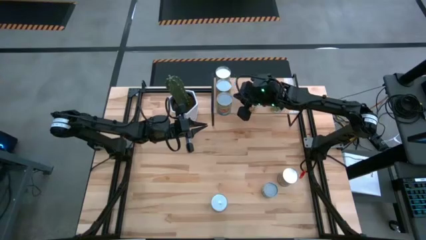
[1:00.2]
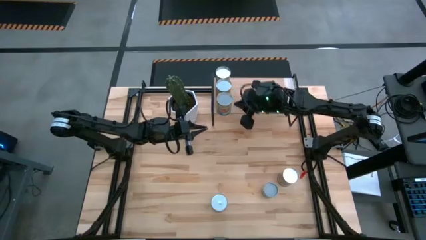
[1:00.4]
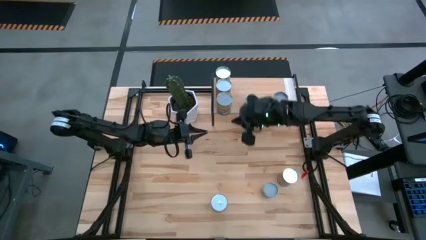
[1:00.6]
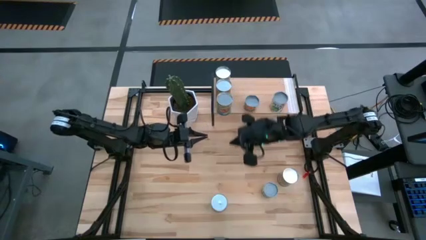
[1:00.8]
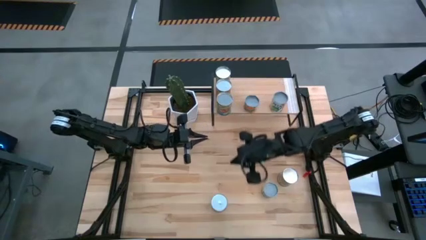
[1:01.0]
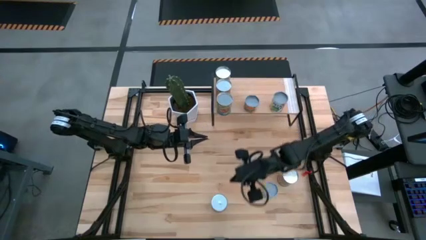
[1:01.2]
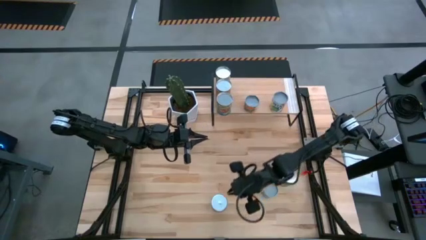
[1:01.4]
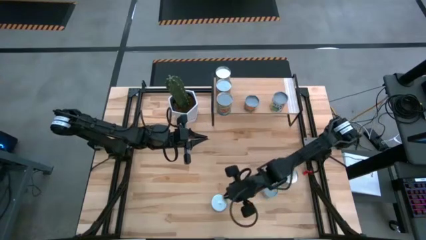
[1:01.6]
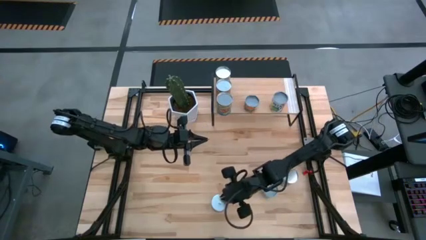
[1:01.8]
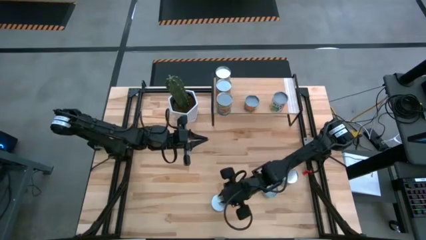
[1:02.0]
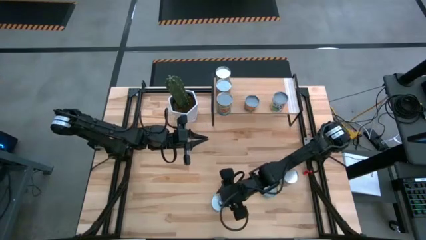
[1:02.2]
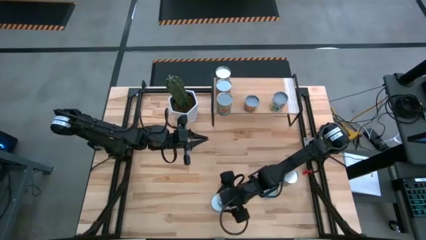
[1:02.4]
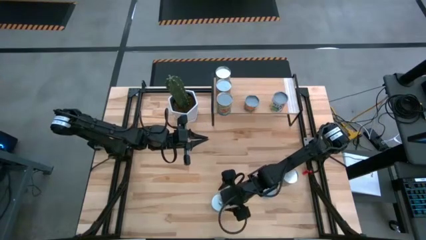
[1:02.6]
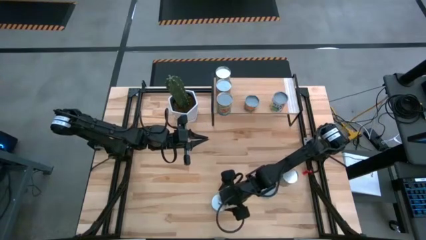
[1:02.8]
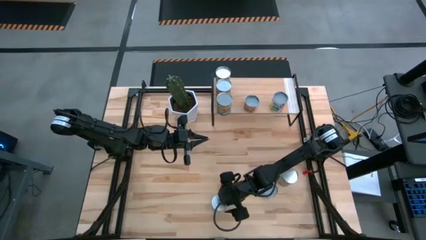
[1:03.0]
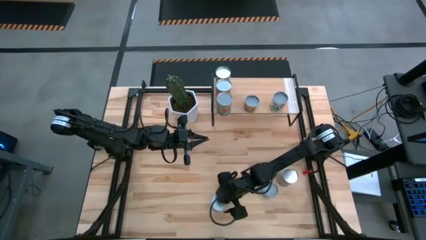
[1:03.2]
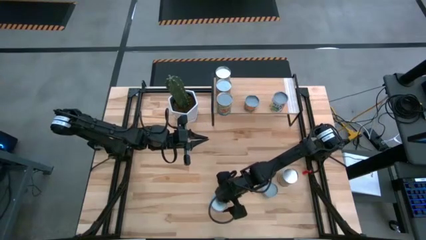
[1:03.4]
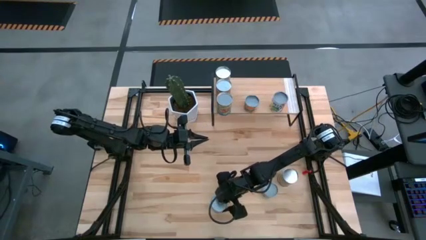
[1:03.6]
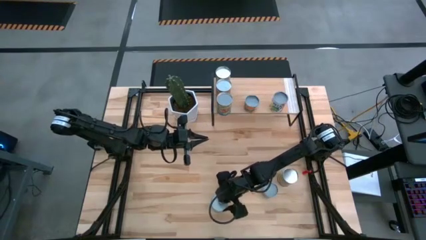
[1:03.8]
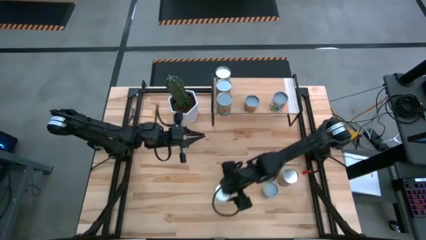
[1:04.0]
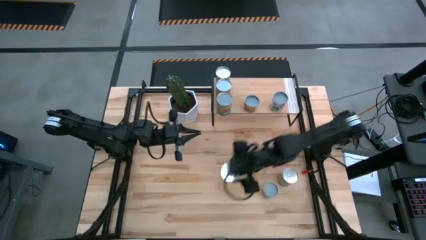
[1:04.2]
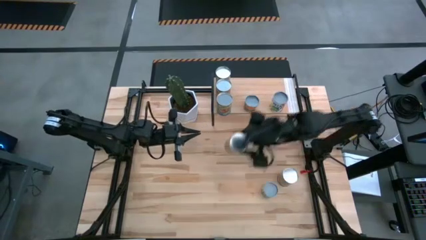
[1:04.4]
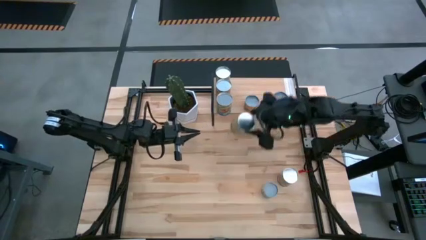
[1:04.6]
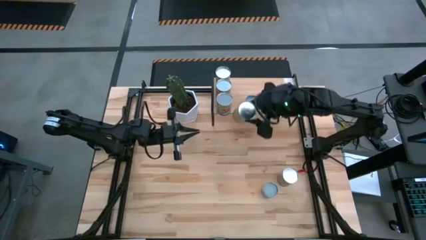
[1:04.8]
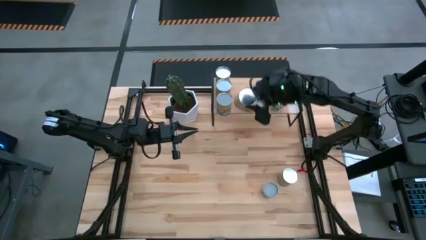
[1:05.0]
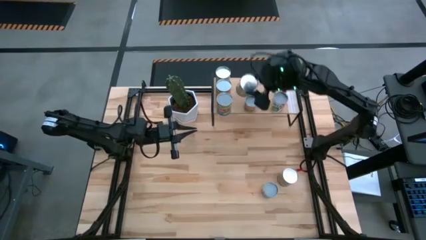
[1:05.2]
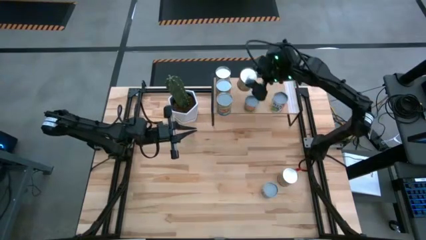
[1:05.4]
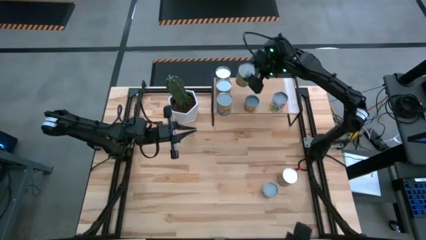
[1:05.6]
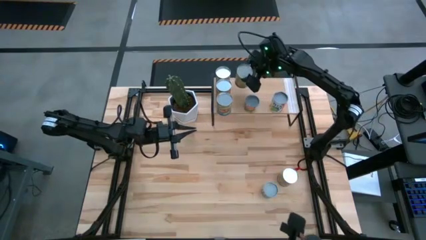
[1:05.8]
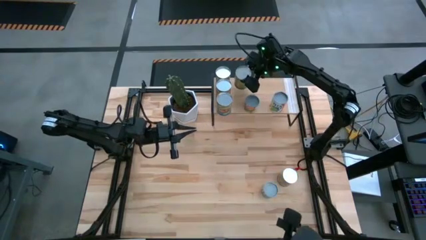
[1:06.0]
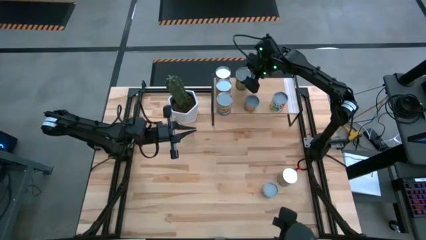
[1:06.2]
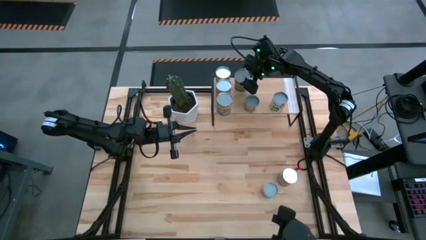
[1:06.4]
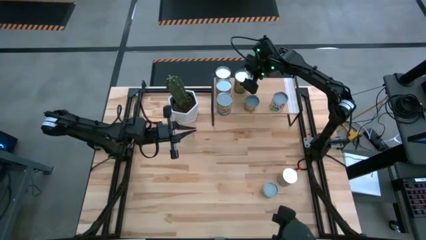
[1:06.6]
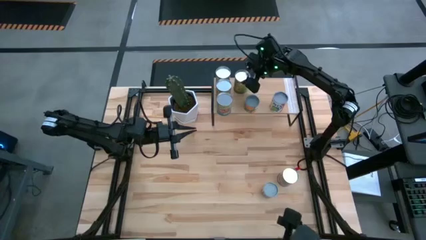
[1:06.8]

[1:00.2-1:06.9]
Task: Pick and place cans onto a shelf
Put the canned oranges on the shelf

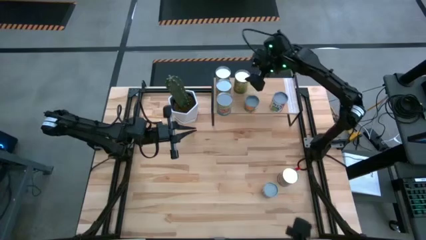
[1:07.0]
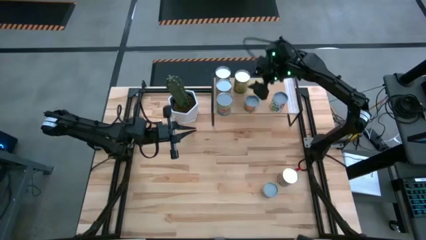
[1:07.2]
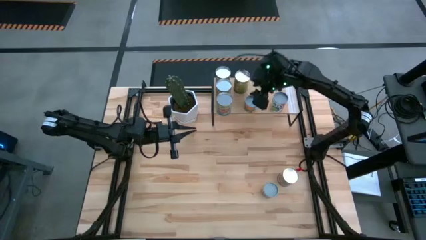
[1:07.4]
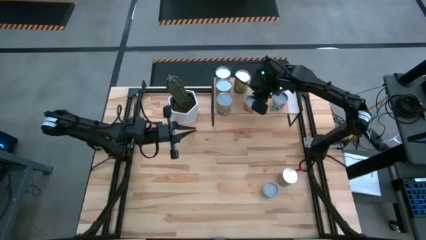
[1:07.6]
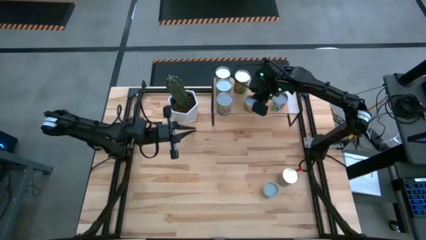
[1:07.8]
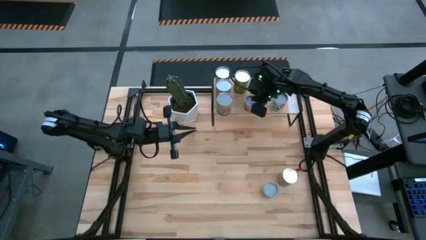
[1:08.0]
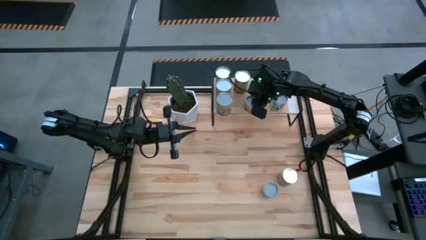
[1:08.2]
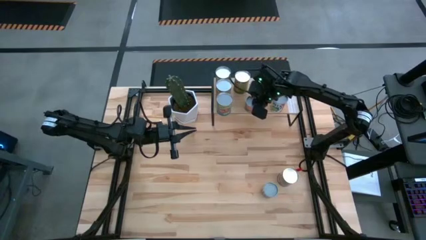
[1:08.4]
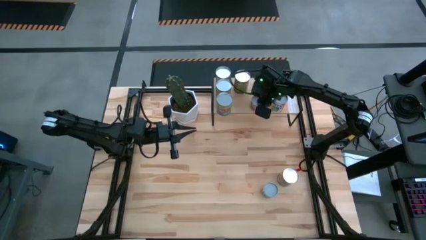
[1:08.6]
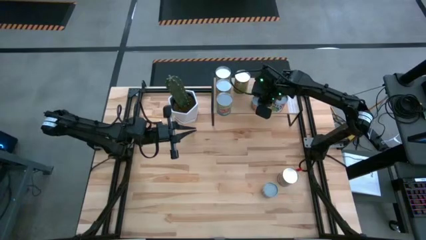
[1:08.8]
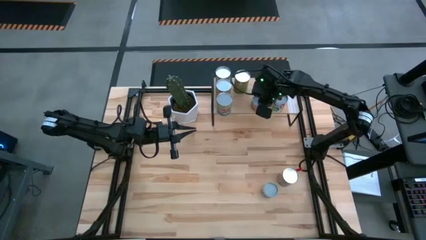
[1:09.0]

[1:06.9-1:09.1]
Adjust the canned mandarin oranges on the shelf

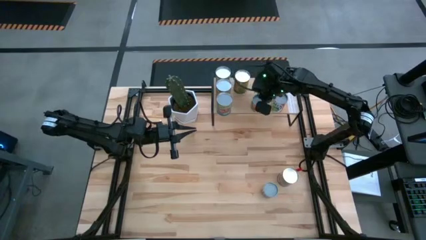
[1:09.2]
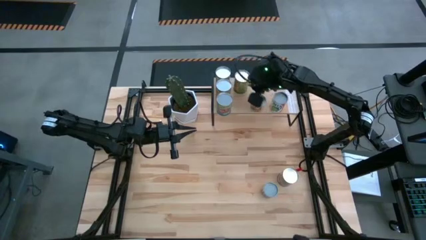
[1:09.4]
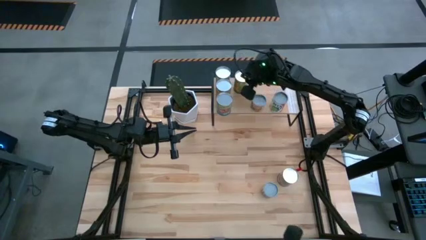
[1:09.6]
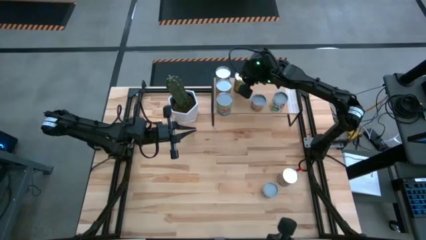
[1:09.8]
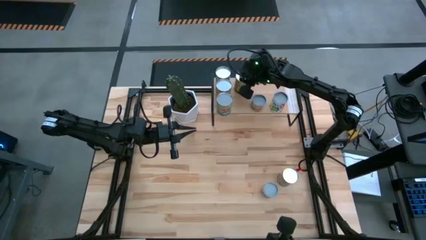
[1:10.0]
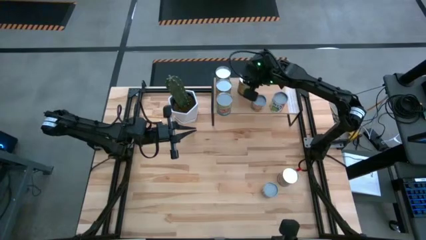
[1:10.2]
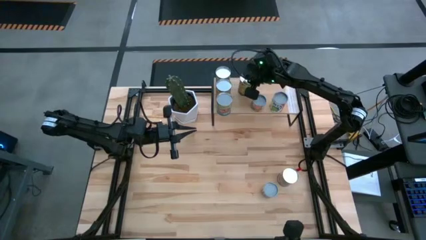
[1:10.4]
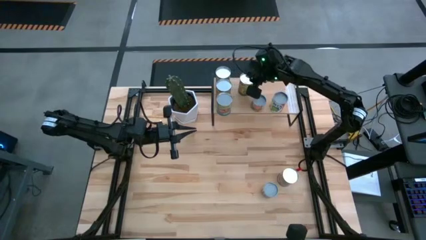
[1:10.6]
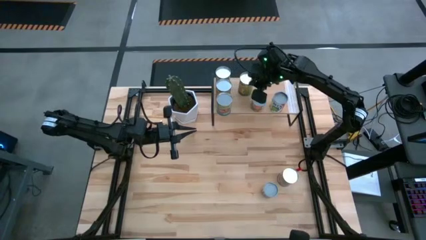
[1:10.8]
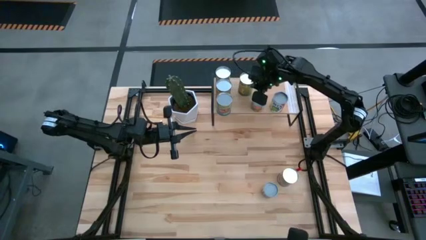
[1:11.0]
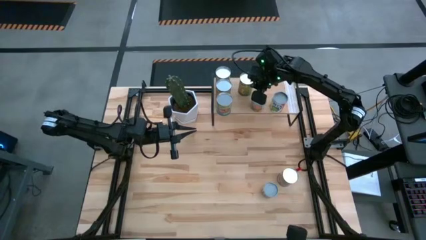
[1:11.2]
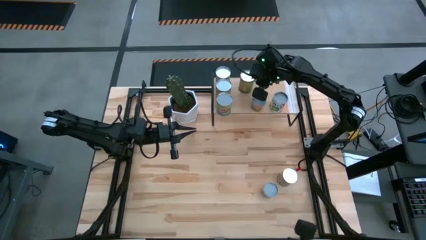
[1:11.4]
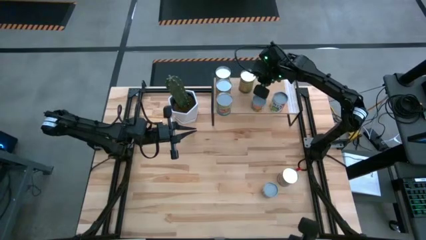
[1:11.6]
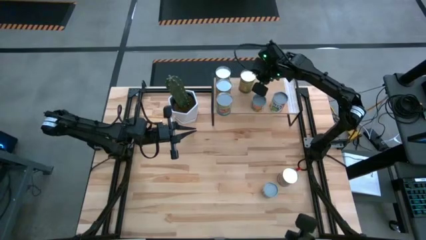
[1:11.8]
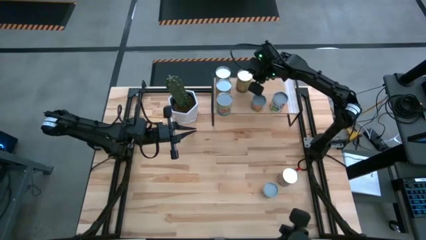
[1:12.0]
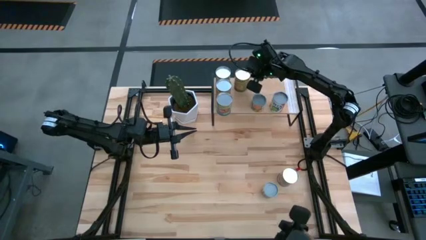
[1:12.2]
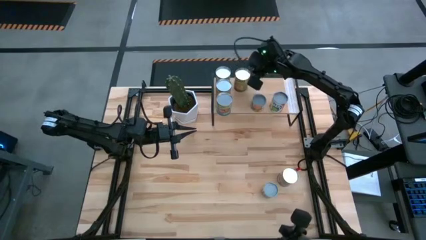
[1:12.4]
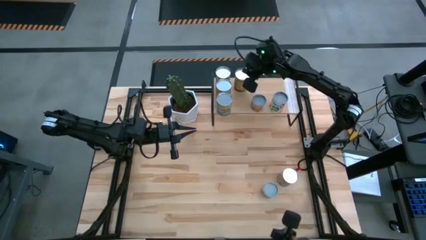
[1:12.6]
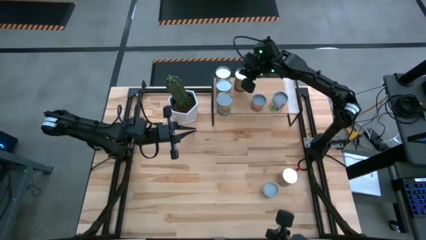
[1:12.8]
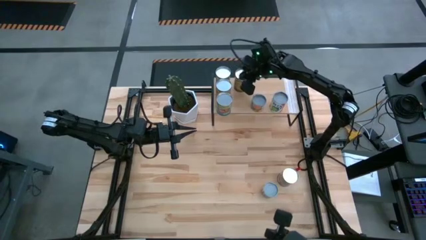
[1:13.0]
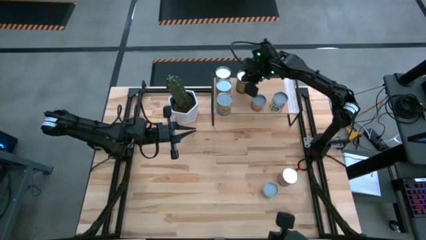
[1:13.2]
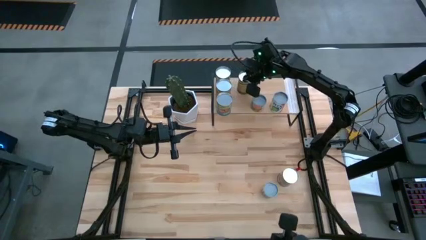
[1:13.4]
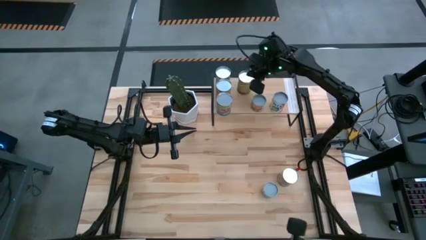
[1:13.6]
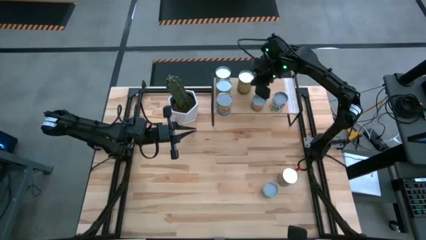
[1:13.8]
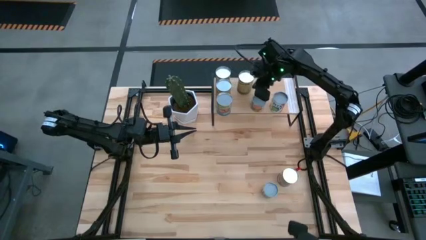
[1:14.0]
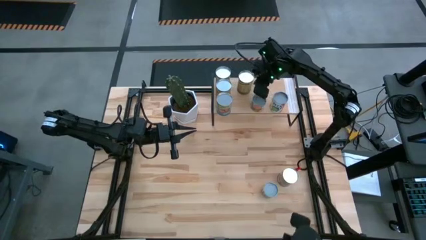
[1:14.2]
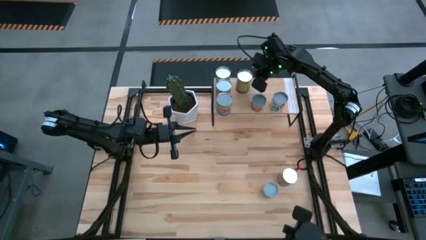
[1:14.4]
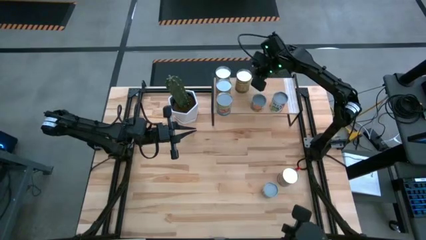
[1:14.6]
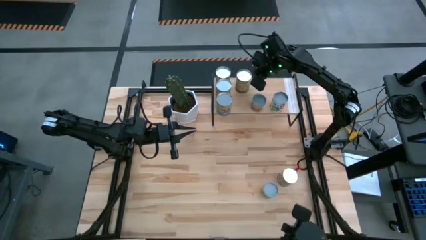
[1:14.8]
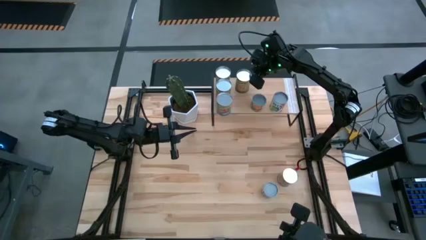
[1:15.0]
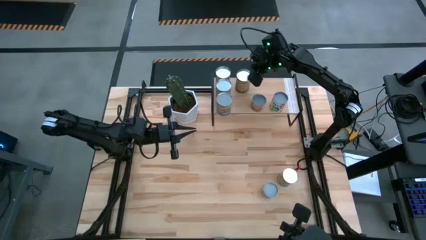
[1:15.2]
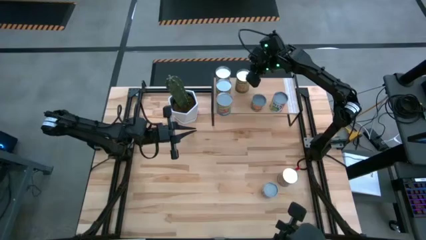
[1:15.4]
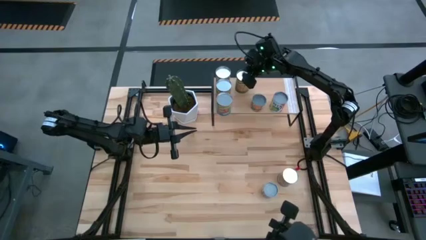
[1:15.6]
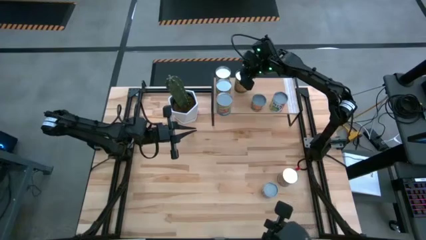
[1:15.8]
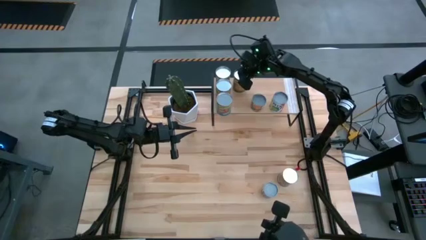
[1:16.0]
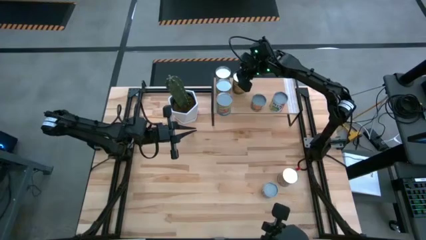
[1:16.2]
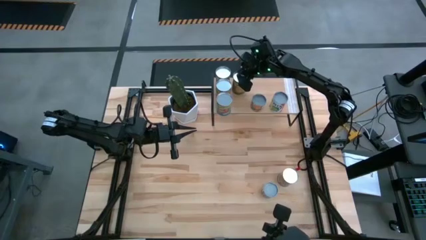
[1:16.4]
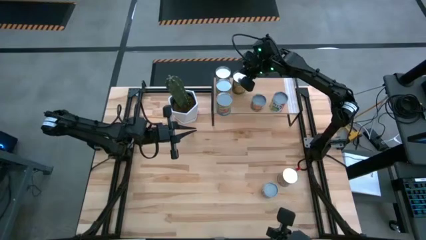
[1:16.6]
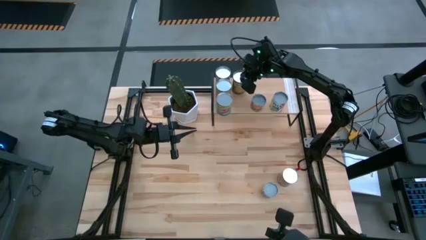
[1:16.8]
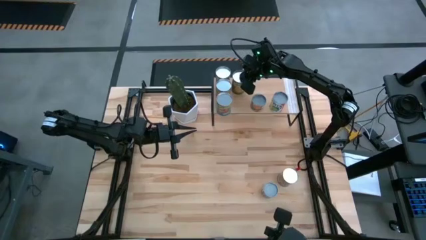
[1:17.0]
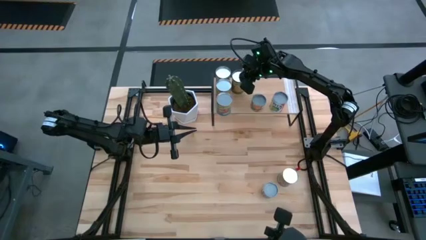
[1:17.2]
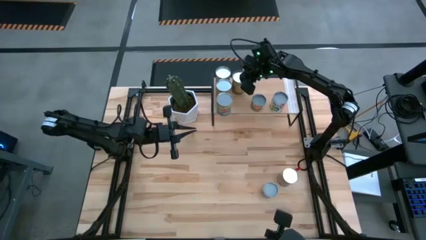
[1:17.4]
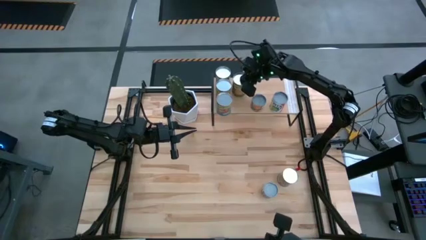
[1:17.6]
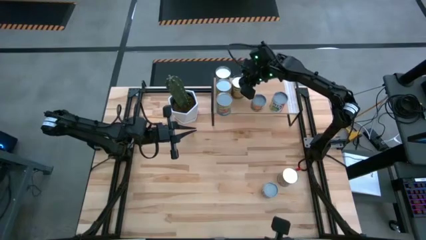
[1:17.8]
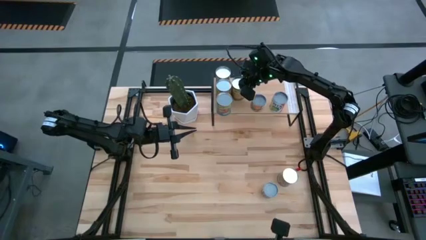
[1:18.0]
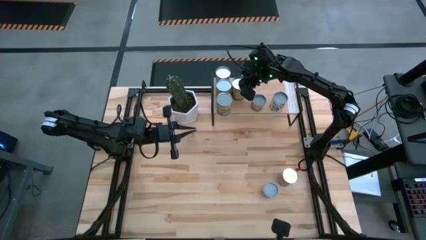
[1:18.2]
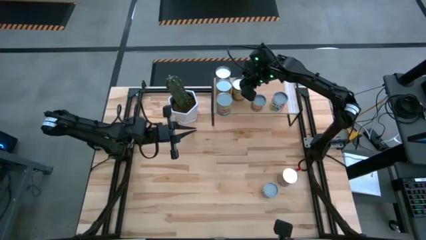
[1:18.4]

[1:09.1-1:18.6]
Adjust the canned oranges on the shelf
